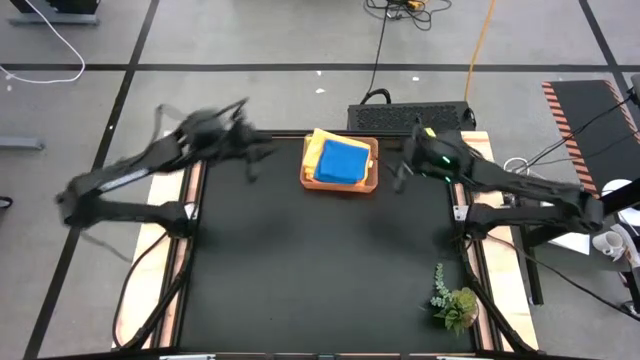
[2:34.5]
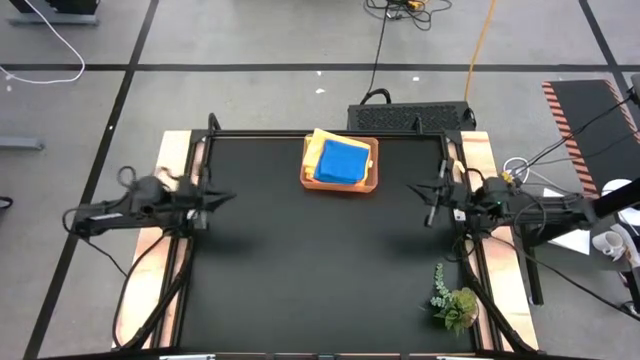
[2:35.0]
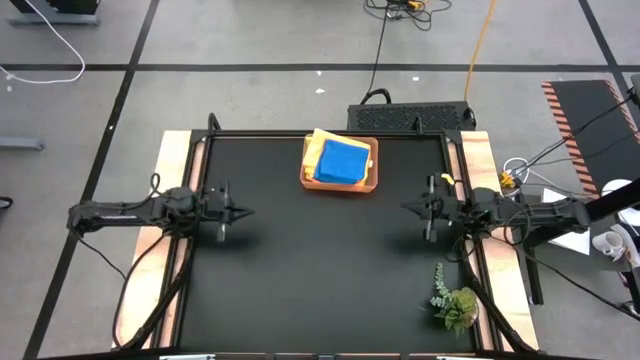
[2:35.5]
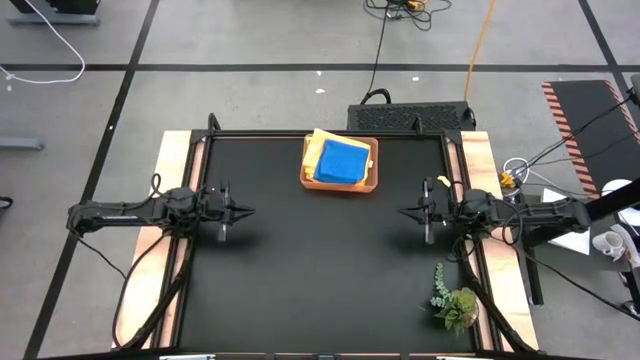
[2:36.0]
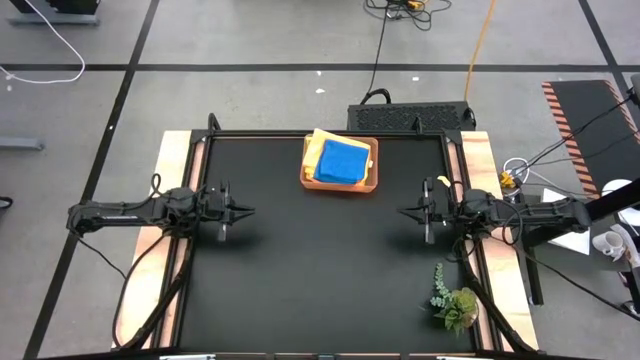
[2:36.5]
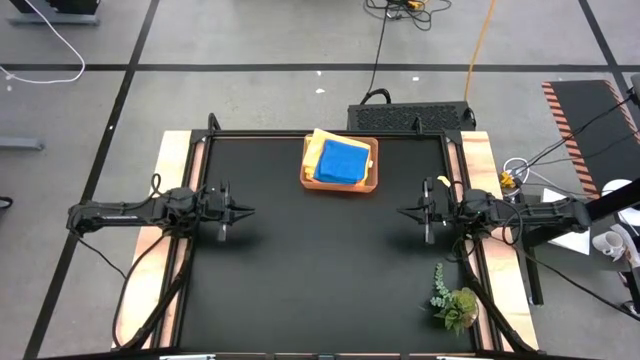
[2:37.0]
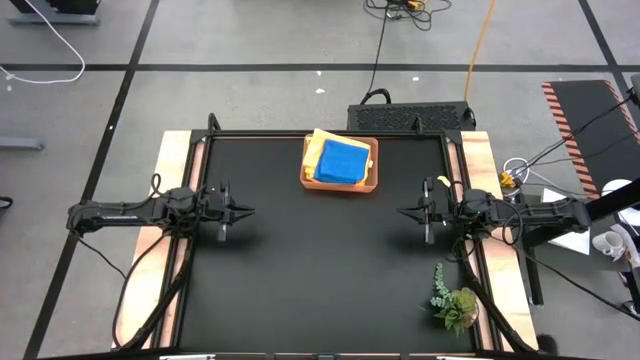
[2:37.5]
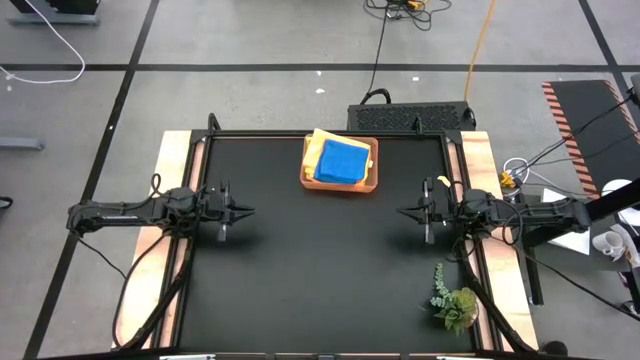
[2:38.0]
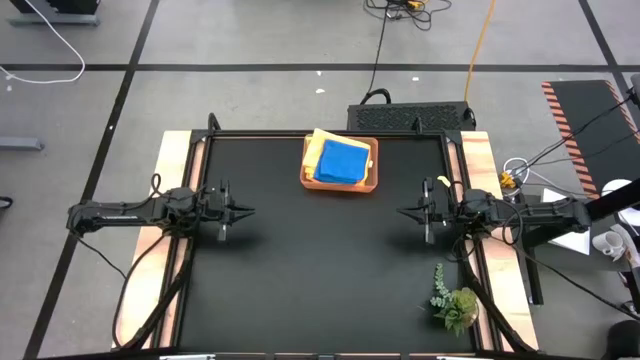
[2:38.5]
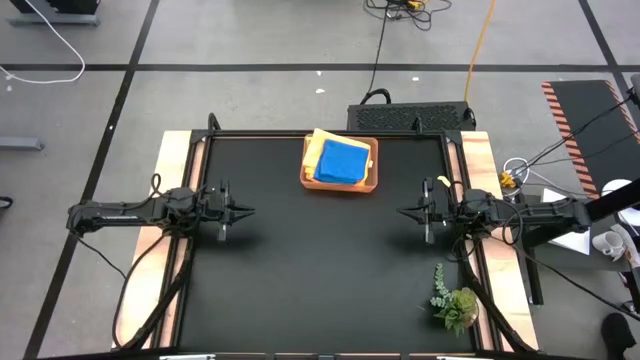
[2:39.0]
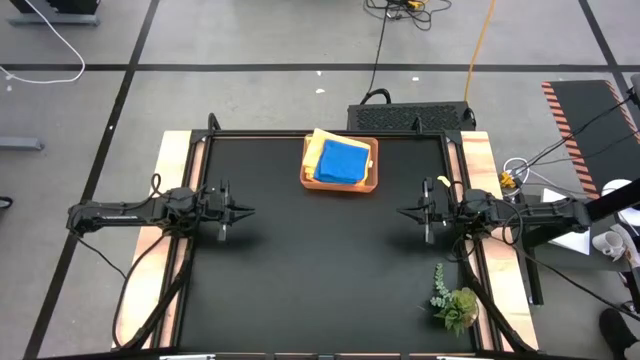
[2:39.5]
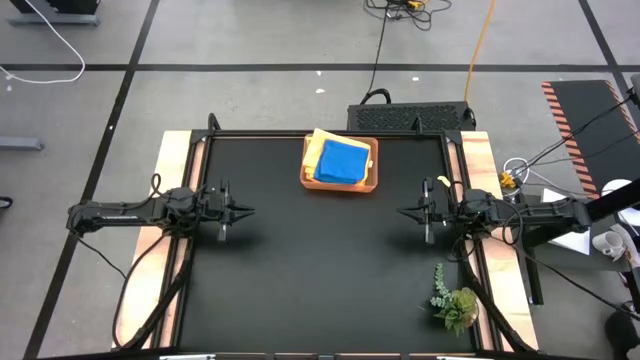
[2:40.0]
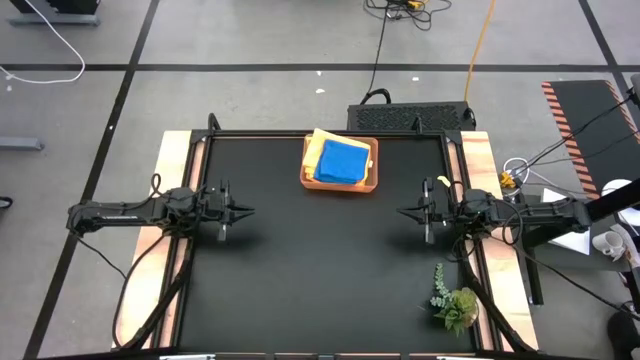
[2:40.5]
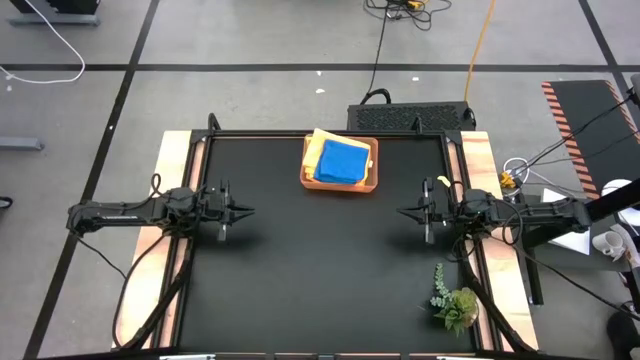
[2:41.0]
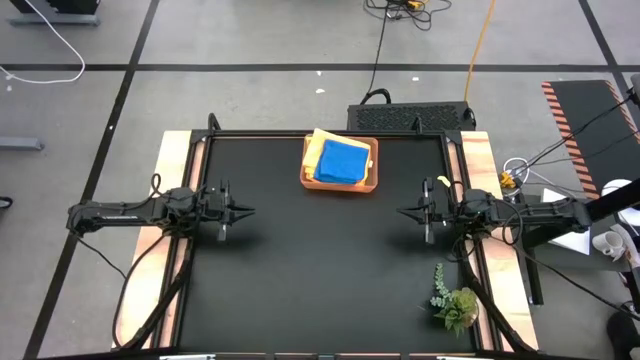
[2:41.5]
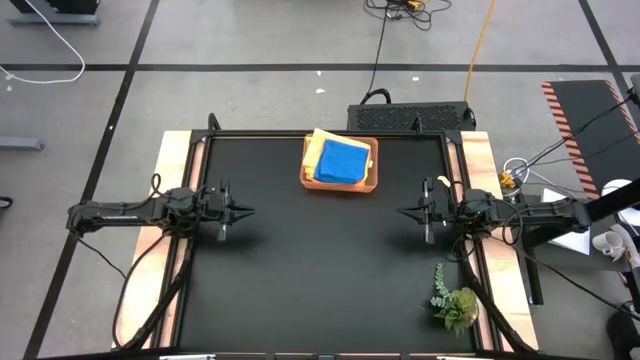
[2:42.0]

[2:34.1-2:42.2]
Task: Fold microfiber towels
Return to Home Position

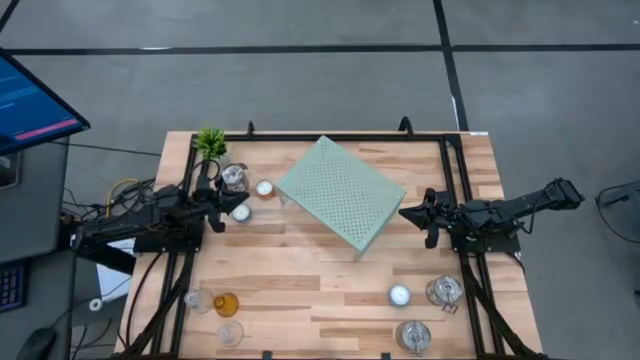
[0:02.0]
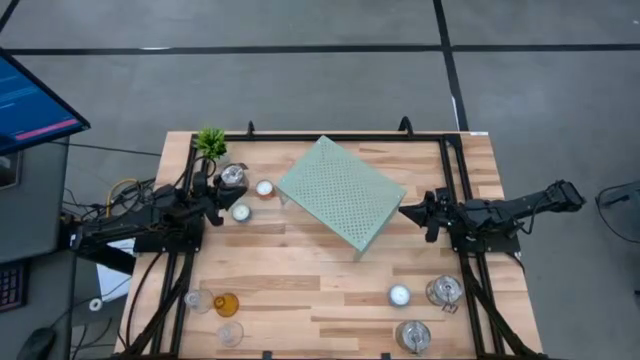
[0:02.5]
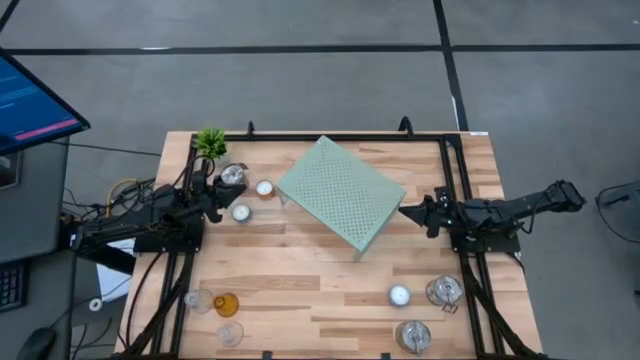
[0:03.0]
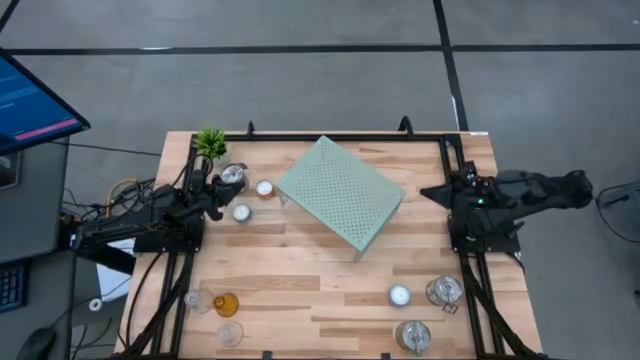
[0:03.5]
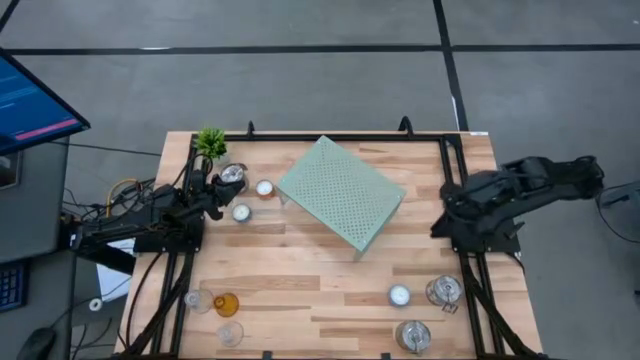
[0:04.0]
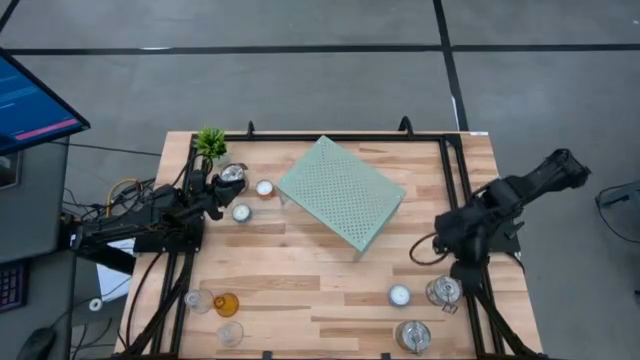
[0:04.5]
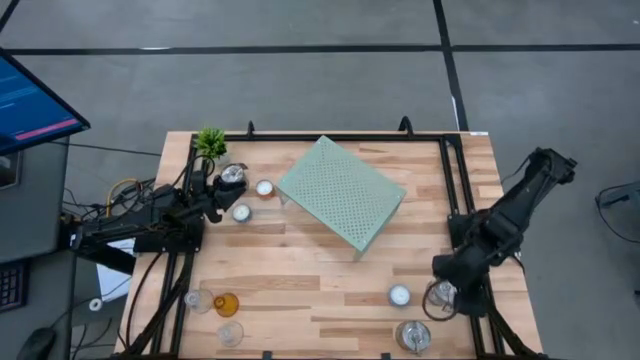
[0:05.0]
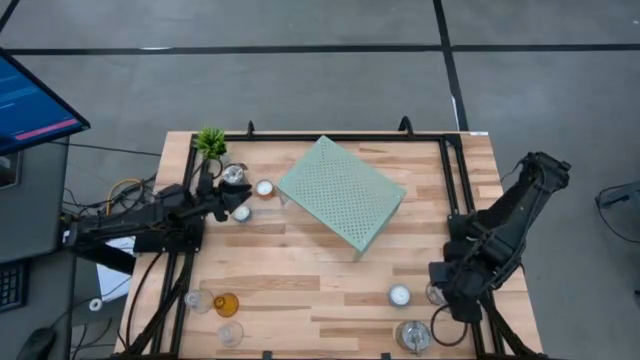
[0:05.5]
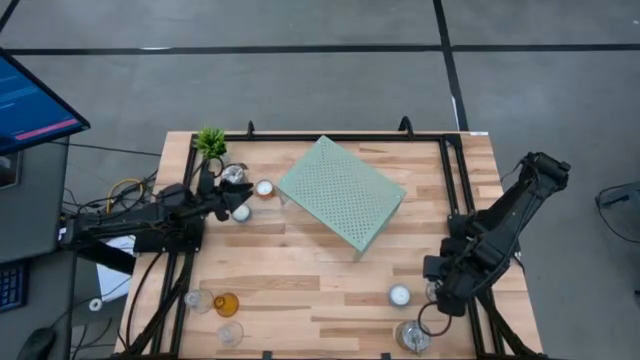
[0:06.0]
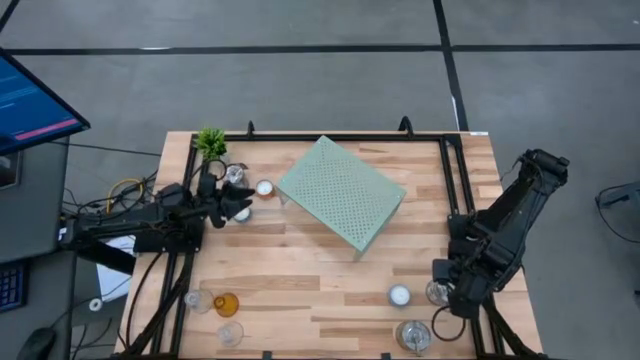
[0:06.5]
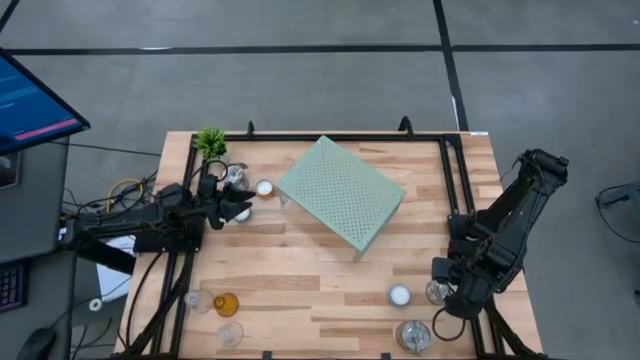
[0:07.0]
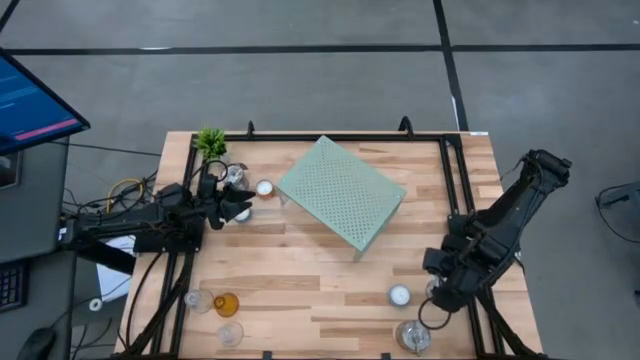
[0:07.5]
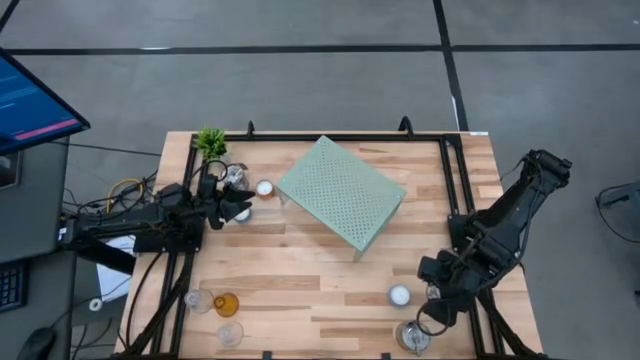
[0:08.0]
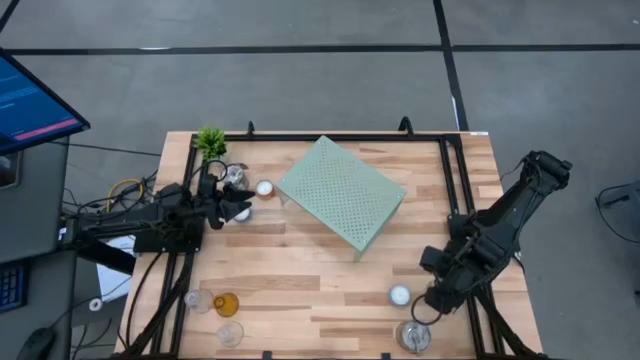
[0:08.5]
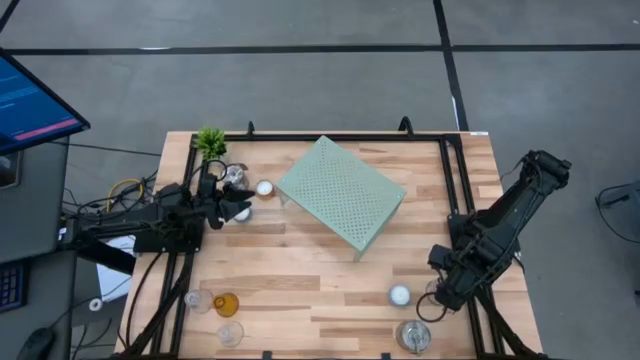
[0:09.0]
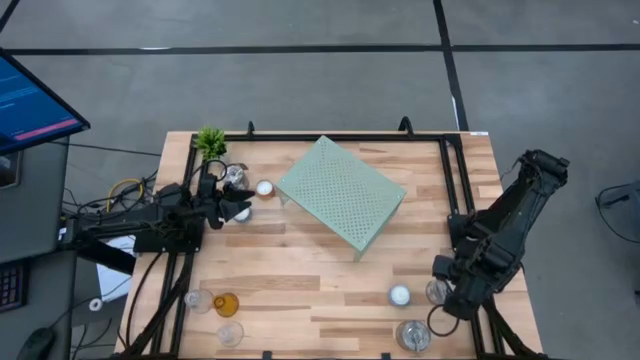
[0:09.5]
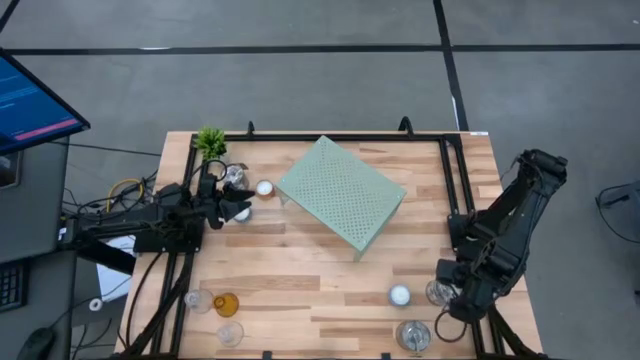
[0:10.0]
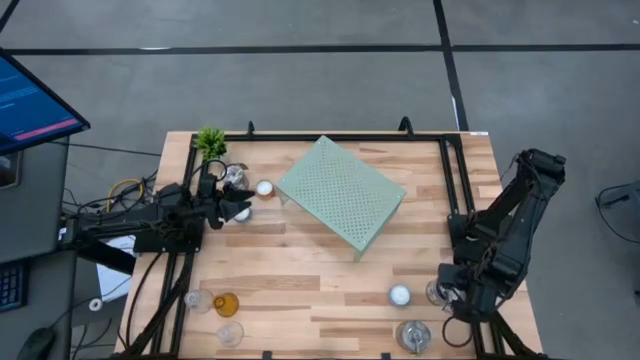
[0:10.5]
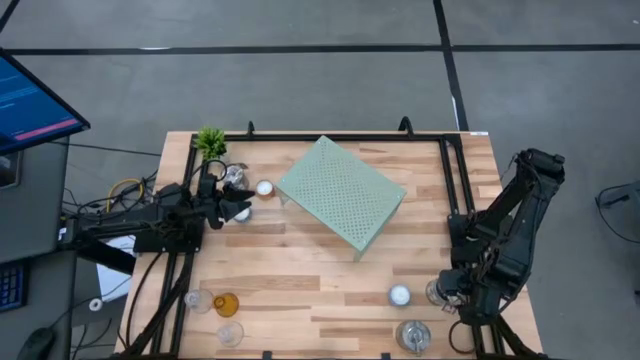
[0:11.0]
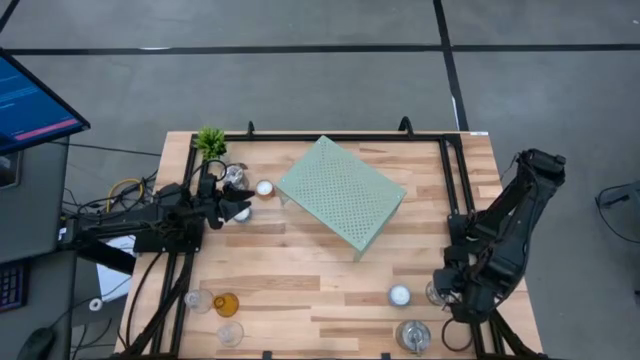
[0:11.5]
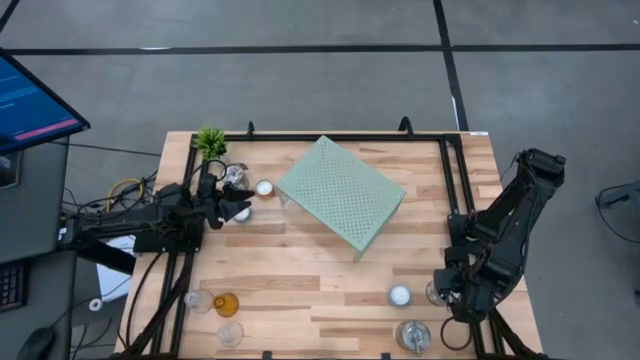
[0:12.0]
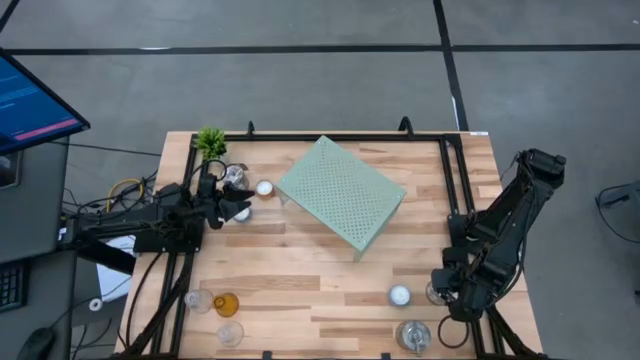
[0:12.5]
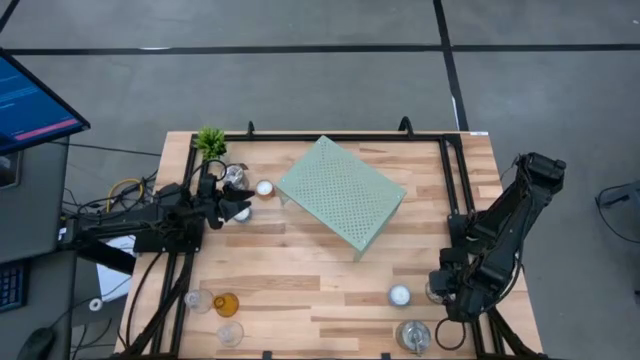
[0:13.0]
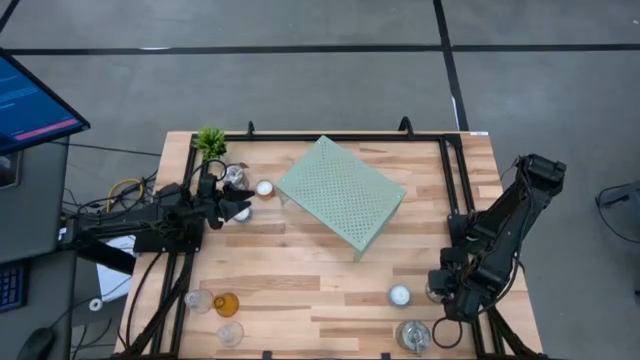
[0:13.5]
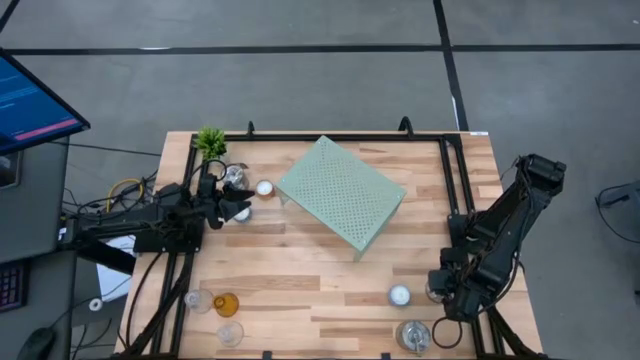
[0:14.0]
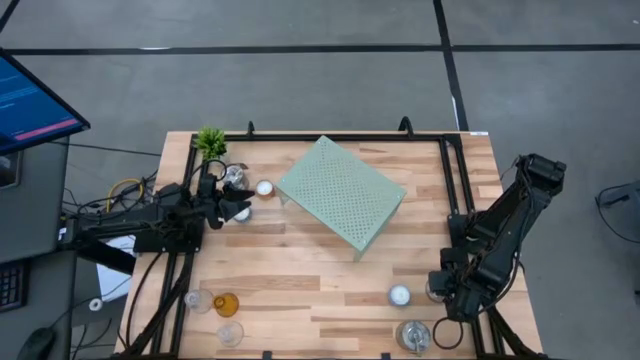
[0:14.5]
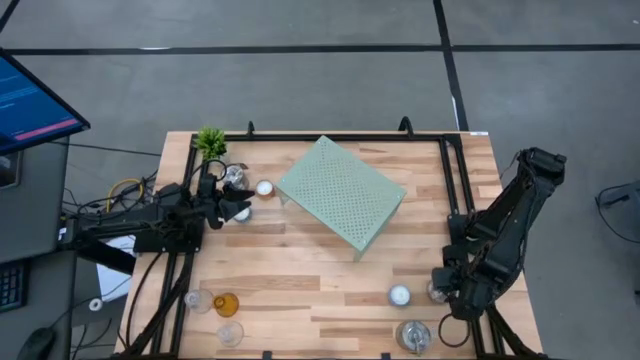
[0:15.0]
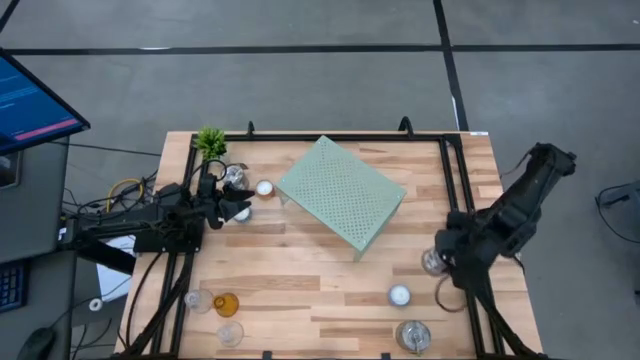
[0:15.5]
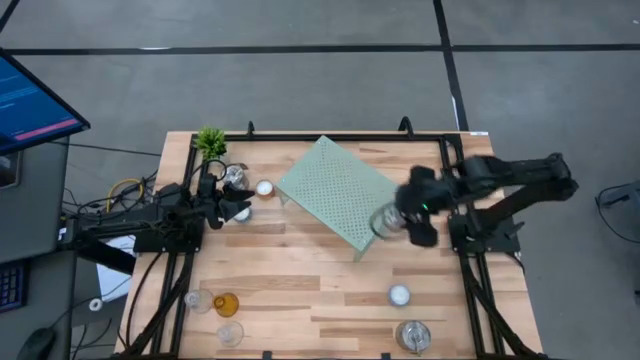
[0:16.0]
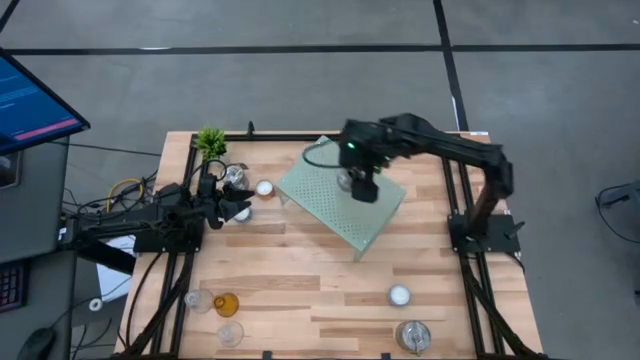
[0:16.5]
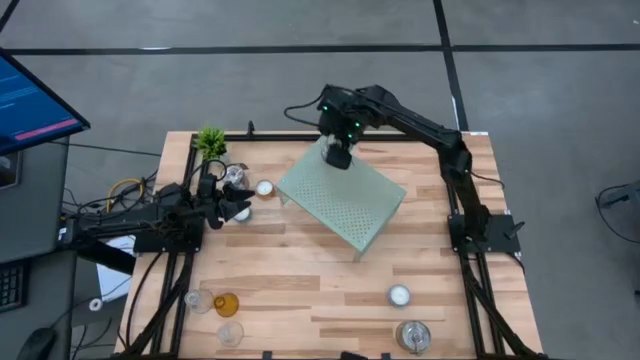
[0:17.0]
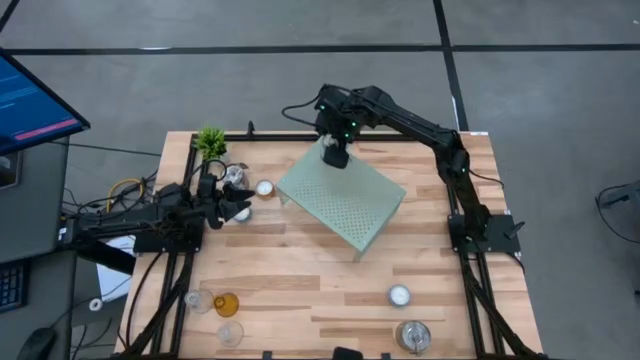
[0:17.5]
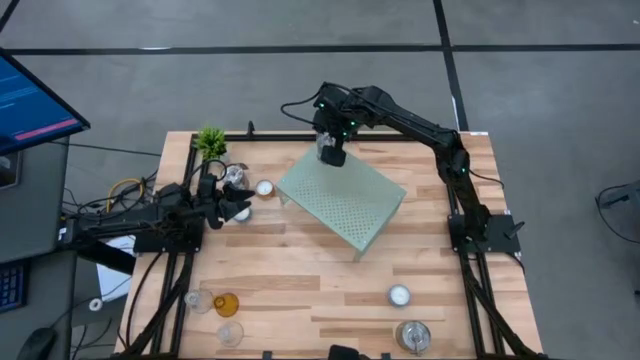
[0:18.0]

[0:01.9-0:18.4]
Task: Stock candles on shelf
Put the right silver scented candle on the shelf
